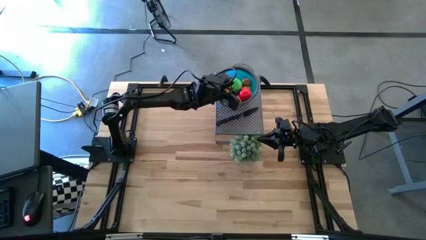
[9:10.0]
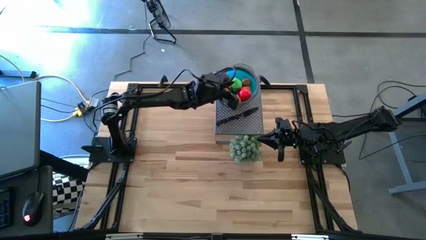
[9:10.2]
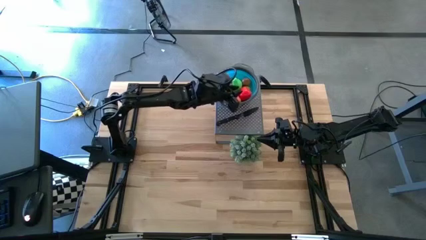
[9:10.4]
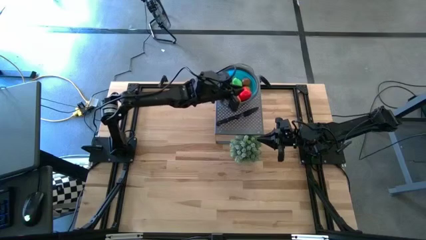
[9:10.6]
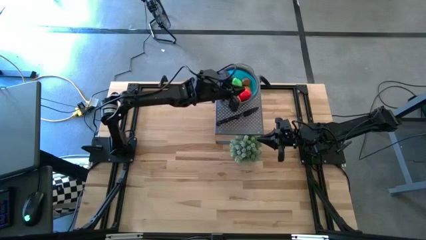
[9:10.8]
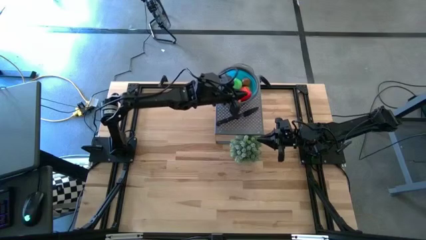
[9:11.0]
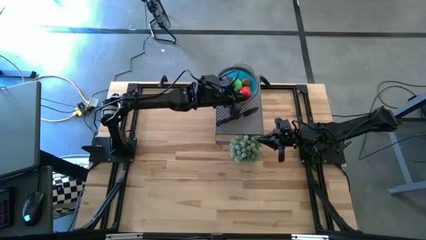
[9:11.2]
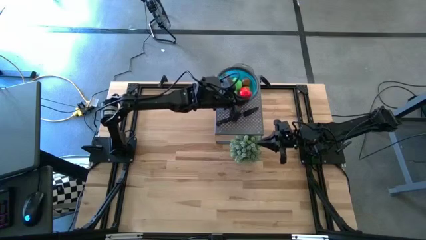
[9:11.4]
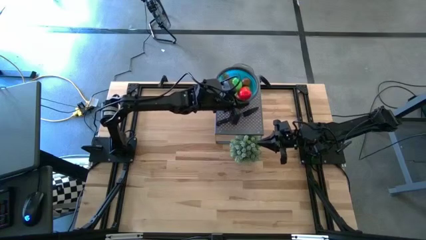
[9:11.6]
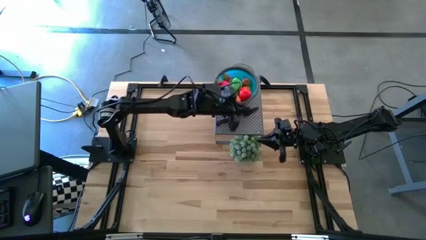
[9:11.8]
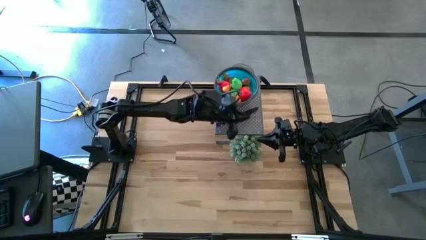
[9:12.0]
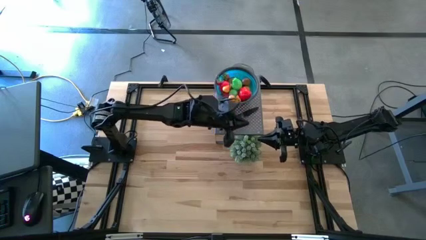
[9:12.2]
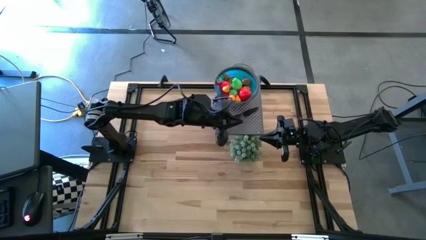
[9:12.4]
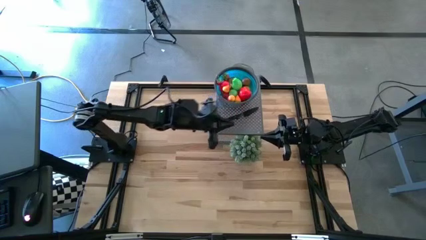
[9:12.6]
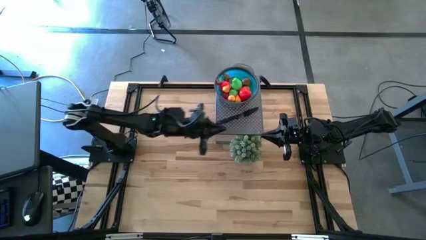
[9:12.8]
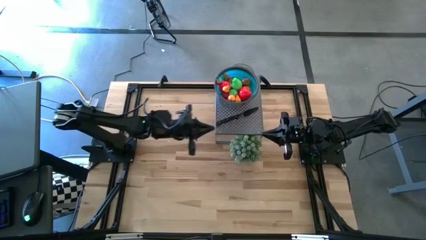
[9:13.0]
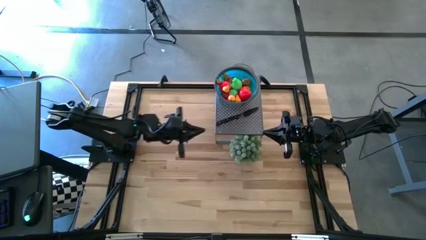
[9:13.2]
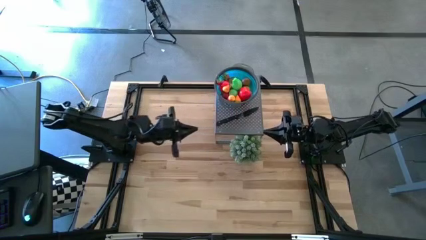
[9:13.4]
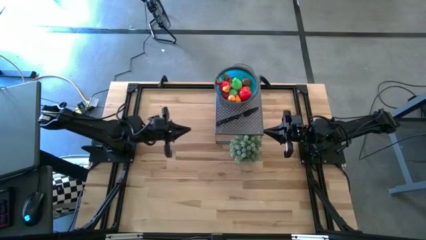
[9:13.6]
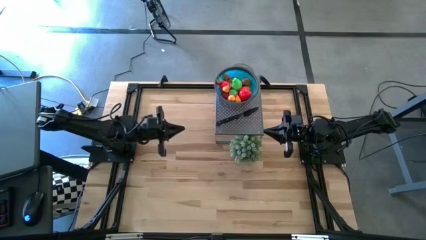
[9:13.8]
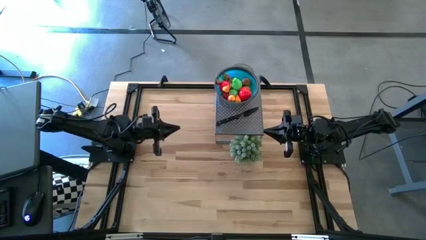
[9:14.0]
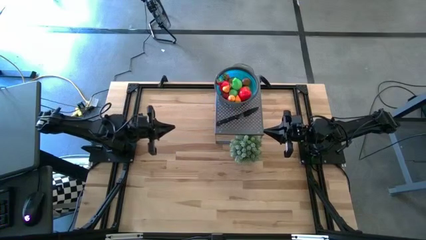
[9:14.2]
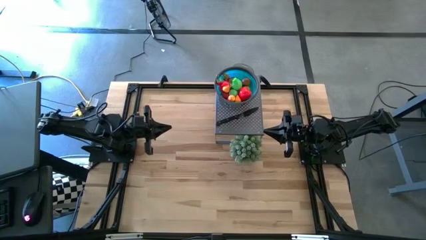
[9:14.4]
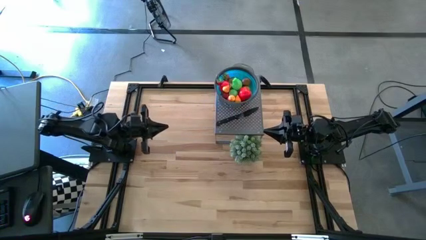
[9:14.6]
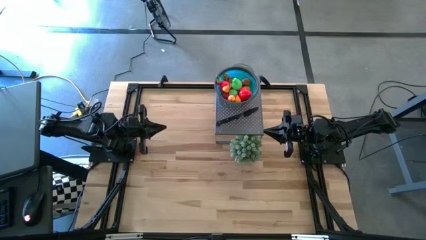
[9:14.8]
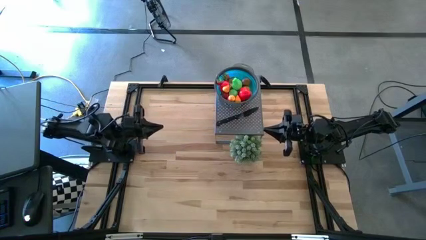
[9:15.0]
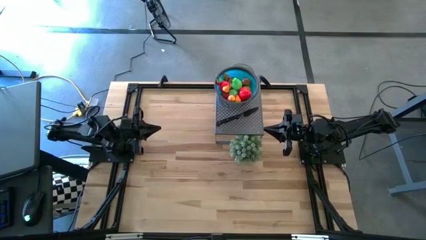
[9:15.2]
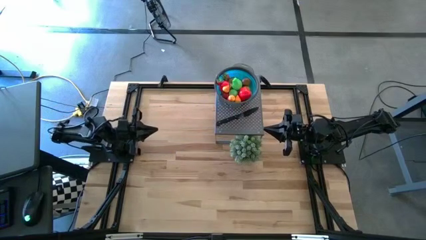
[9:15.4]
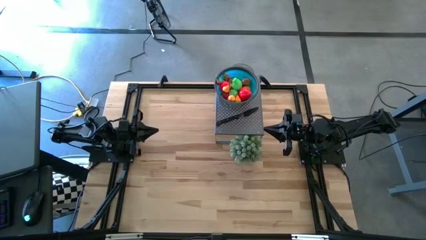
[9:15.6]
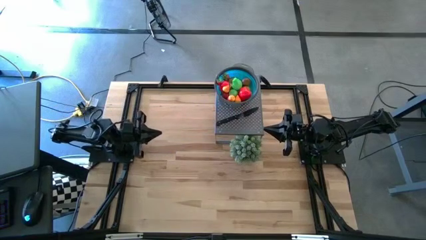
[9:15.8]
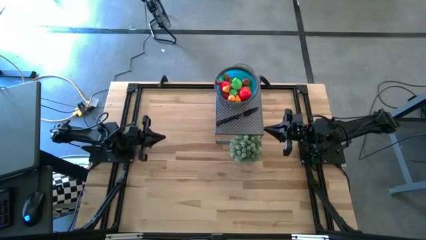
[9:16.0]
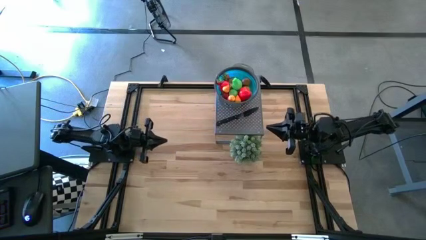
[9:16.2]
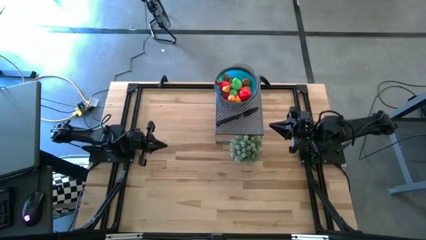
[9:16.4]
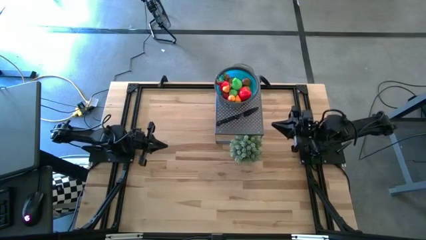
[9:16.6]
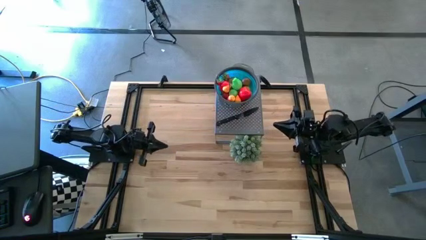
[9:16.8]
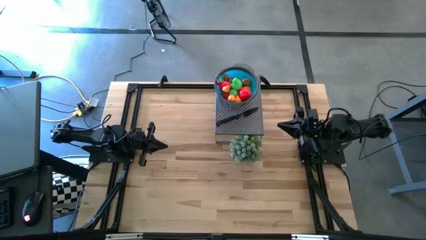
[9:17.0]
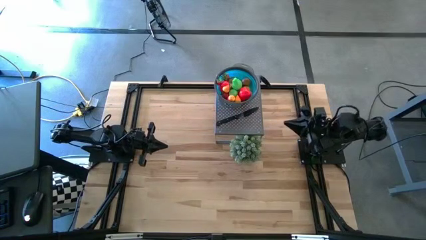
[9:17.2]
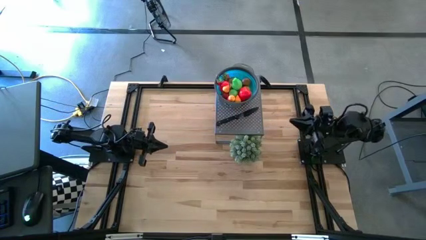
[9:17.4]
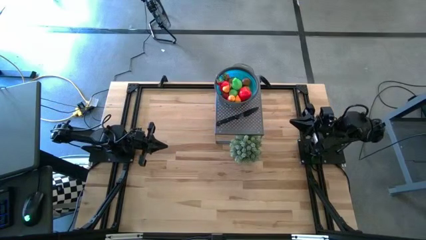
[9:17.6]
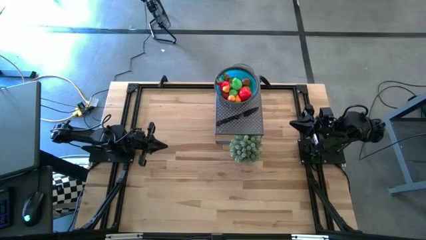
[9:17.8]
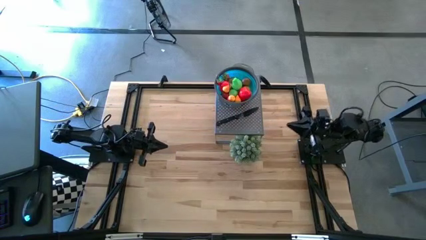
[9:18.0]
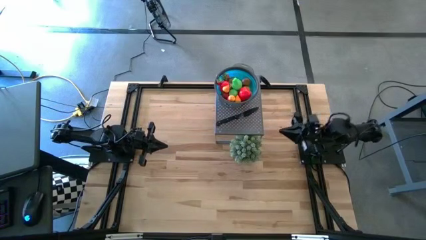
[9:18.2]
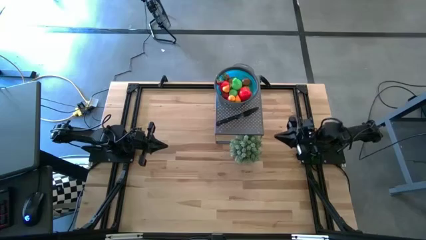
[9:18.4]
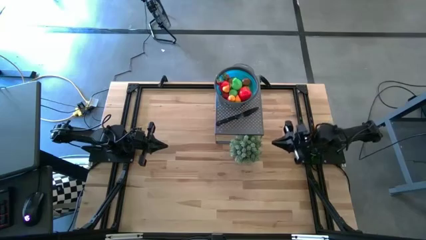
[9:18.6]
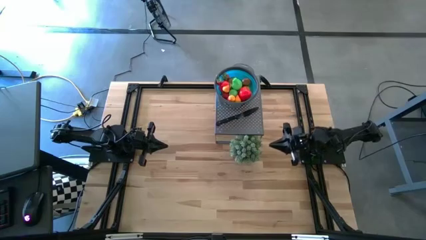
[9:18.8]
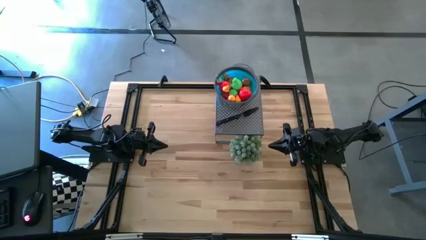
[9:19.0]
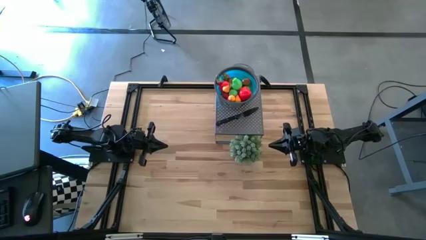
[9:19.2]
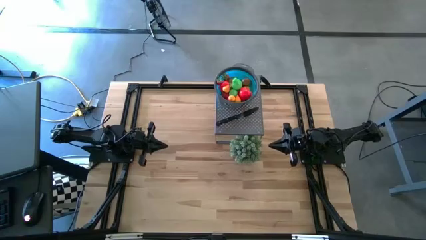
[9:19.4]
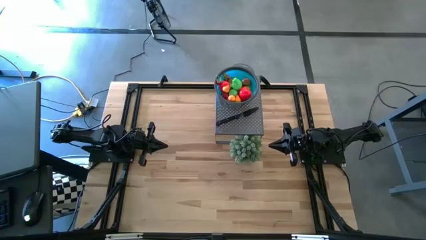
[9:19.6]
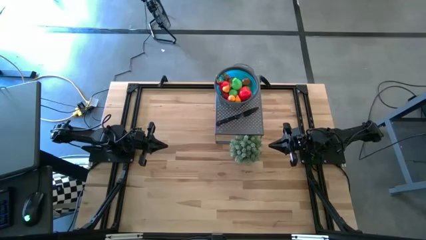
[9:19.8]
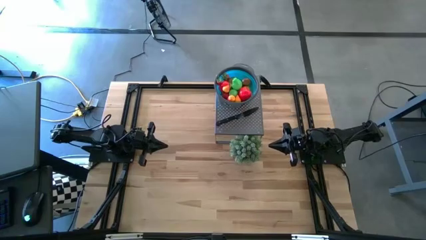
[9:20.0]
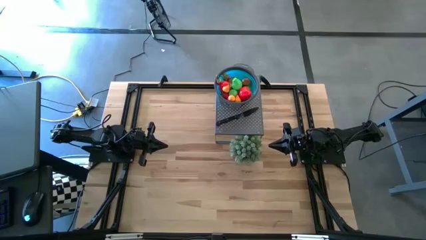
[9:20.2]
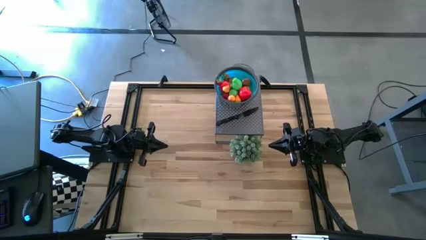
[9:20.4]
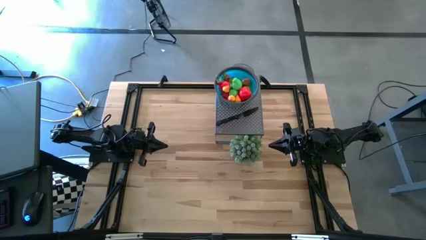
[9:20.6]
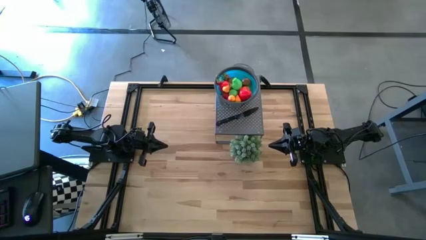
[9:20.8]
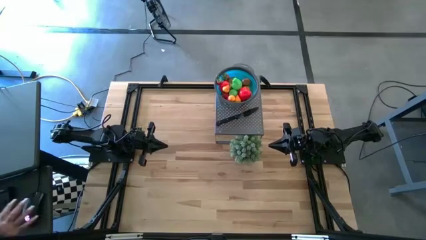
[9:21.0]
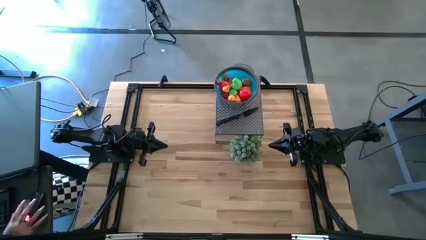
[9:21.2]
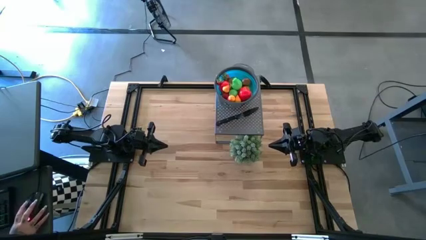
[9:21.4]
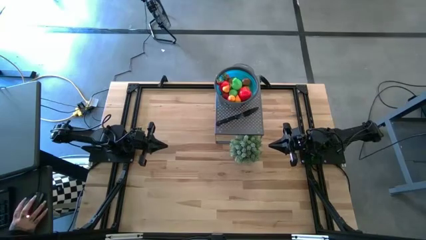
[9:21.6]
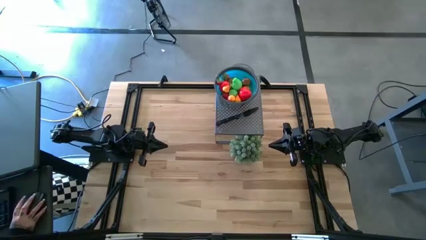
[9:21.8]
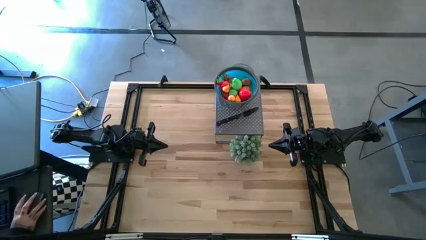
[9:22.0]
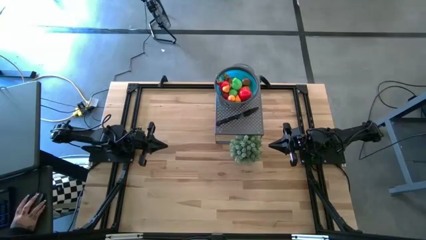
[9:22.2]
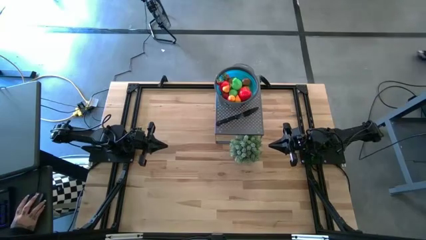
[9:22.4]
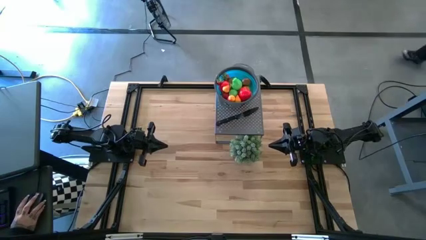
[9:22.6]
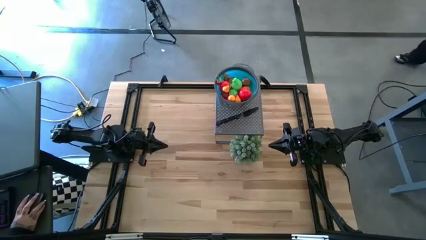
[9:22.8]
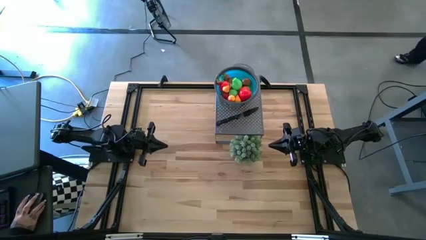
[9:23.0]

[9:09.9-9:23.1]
Task: Pick & Place Fruit
Return to Home Position

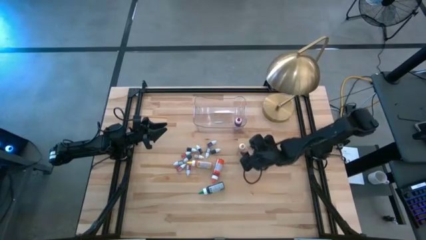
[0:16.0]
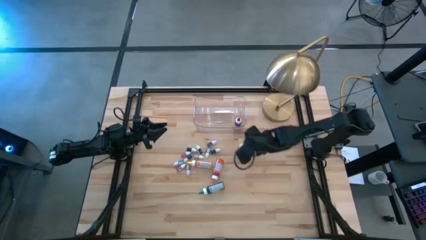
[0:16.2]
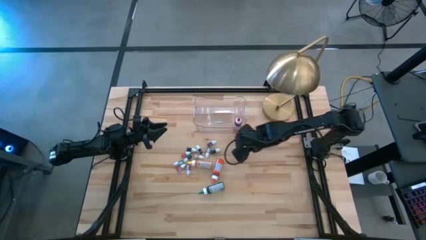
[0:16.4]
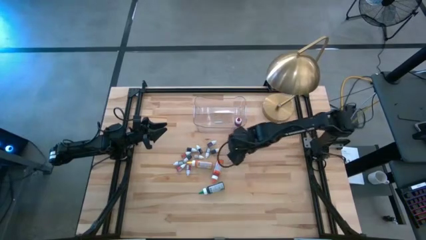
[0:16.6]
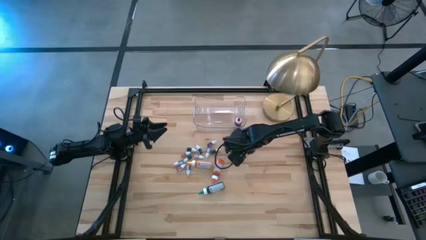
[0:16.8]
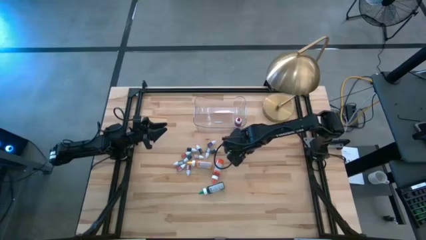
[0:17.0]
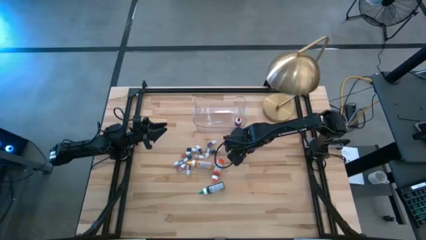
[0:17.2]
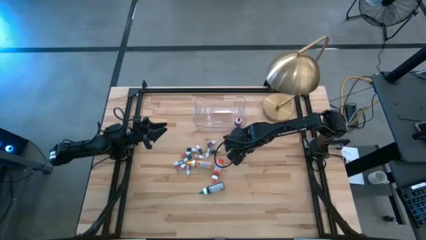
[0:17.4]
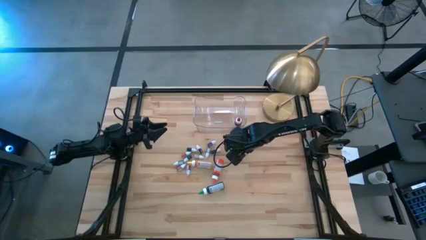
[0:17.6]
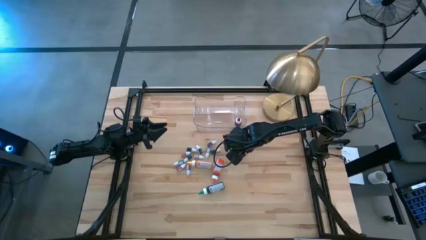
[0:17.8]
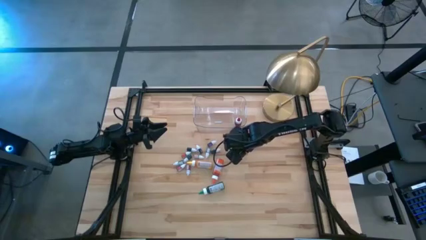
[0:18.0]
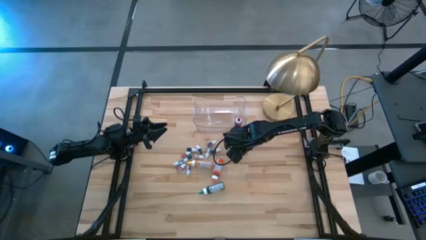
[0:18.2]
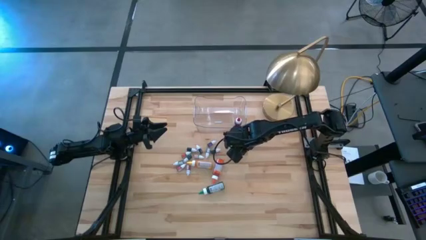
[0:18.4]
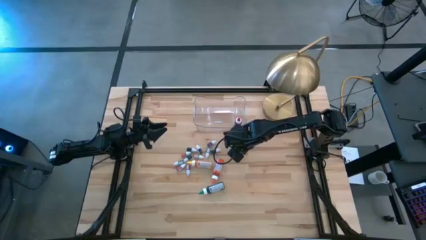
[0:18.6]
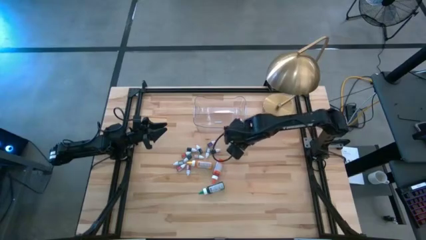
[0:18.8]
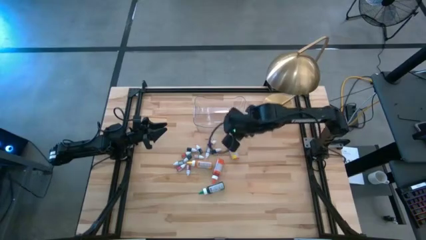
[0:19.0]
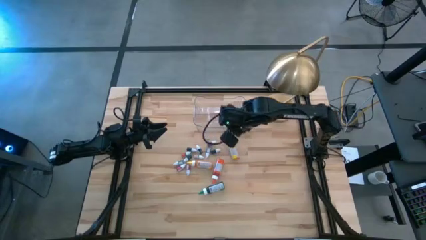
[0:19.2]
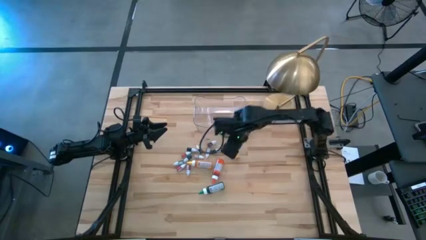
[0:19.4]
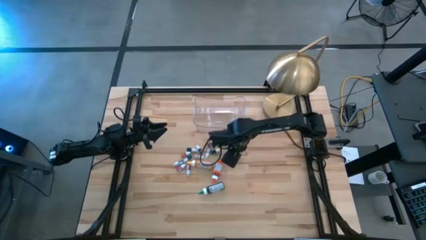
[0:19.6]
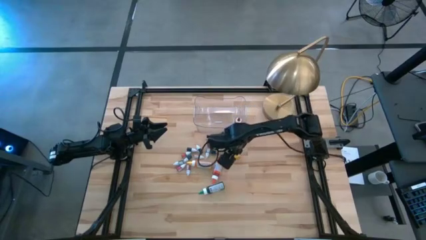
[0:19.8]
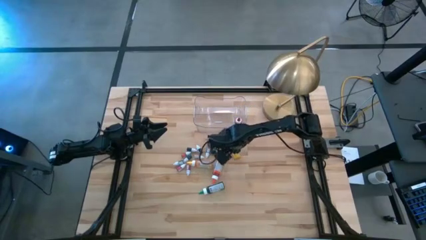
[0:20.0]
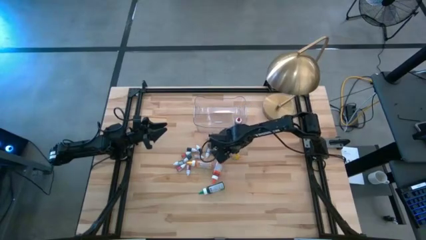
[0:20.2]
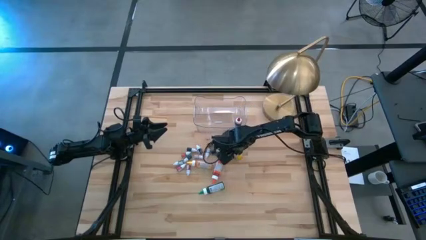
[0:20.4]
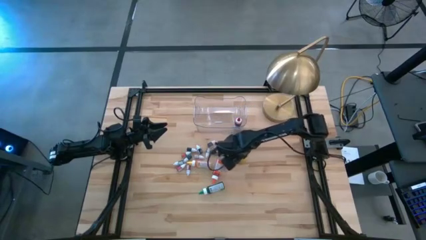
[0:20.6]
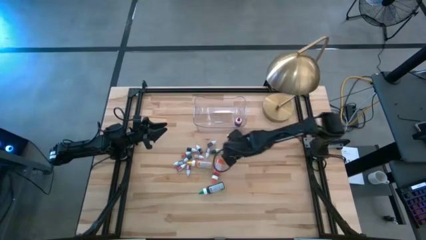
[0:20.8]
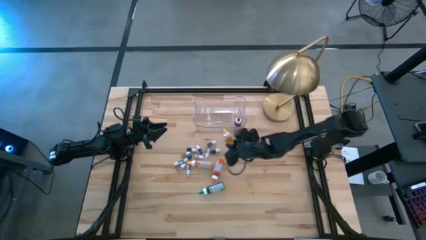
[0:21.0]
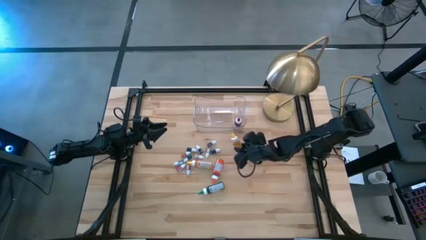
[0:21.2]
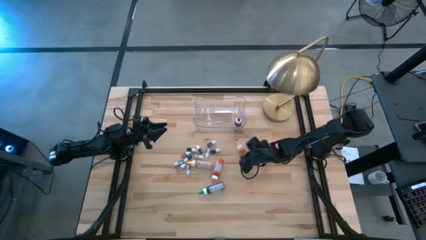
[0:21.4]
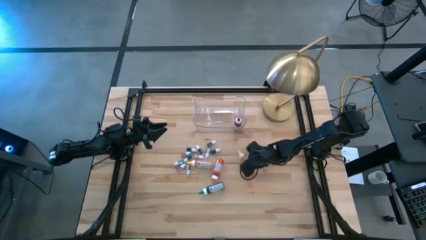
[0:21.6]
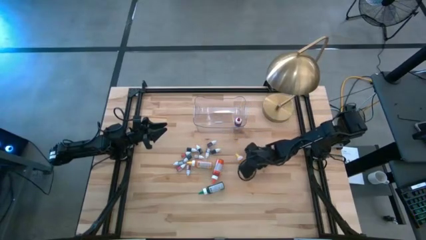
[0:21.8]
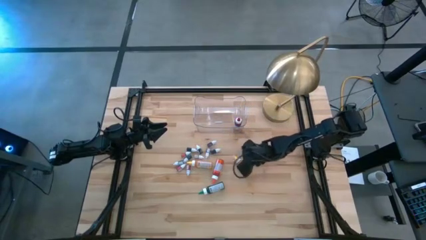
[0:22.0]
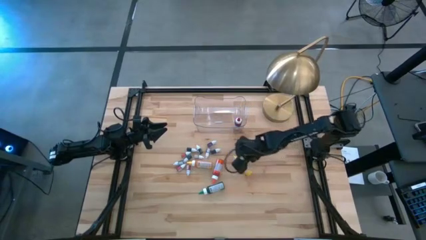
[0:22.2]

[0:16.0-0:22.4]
Task: Pick & Place food coloring
Put the center big yellow food coloring bottle into the transparent bin
